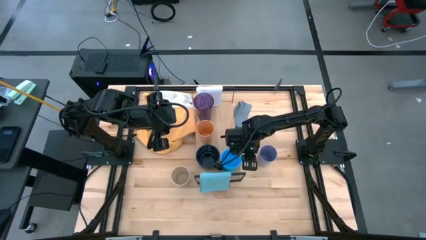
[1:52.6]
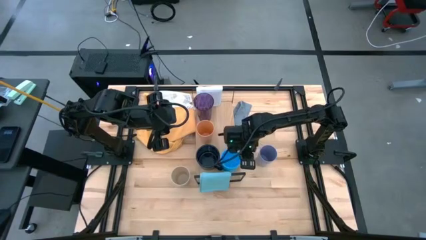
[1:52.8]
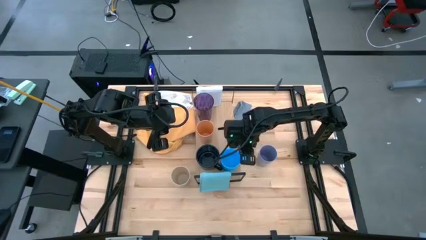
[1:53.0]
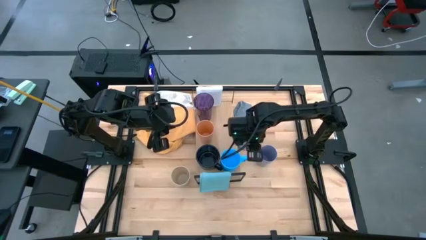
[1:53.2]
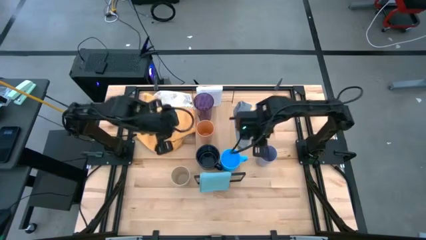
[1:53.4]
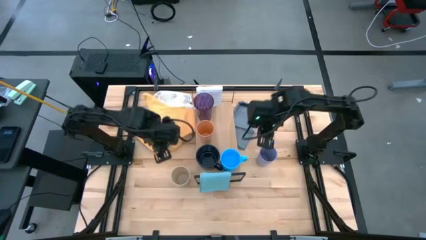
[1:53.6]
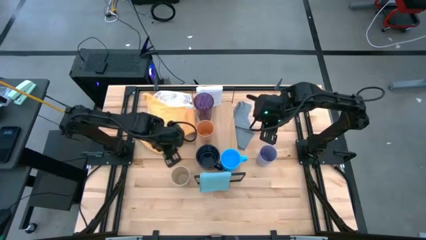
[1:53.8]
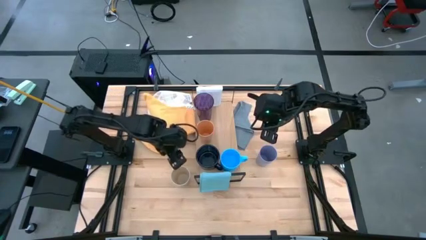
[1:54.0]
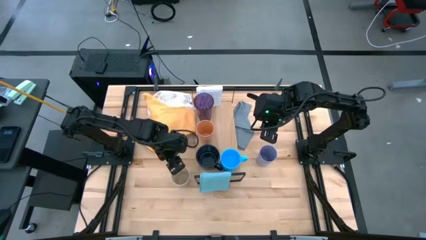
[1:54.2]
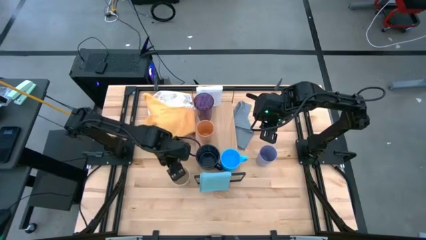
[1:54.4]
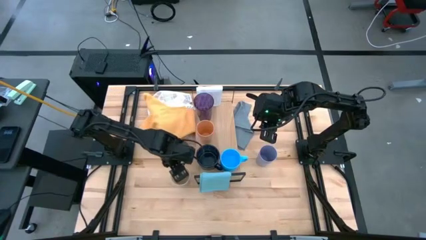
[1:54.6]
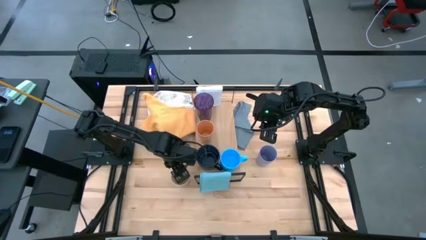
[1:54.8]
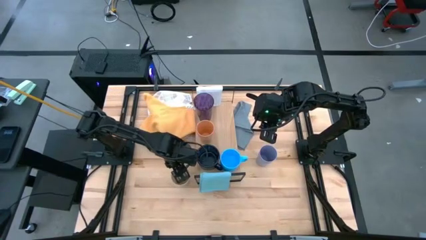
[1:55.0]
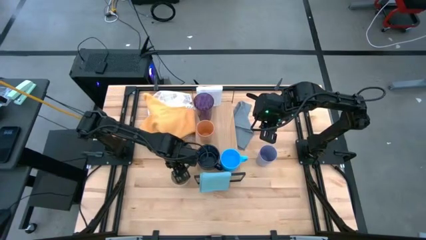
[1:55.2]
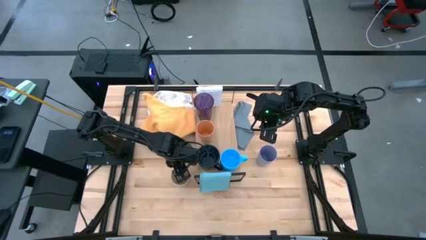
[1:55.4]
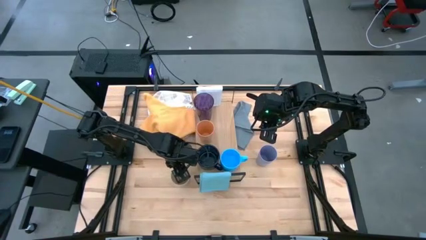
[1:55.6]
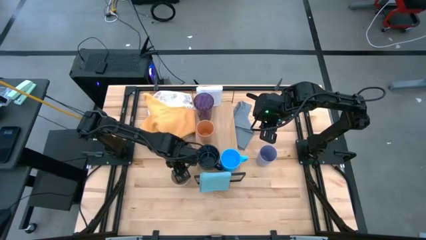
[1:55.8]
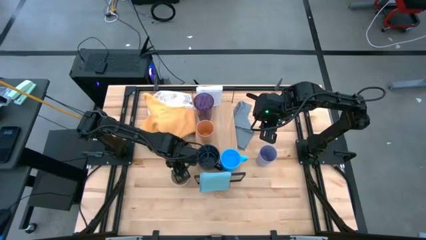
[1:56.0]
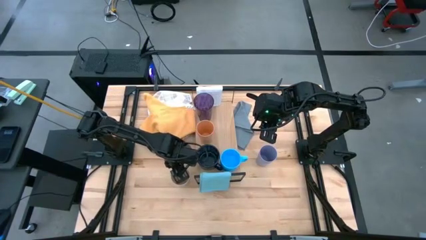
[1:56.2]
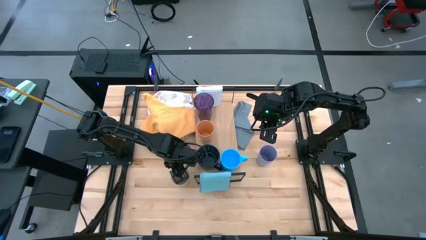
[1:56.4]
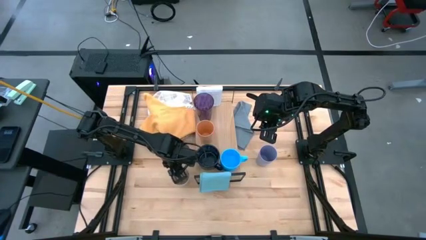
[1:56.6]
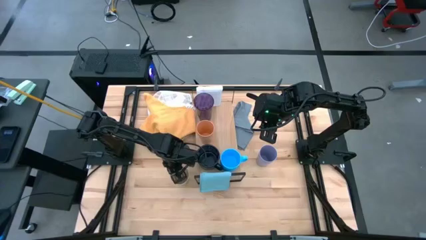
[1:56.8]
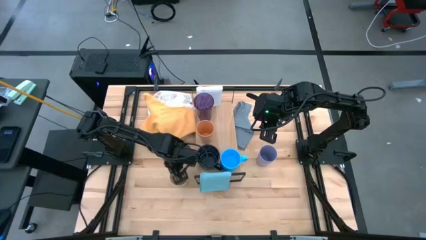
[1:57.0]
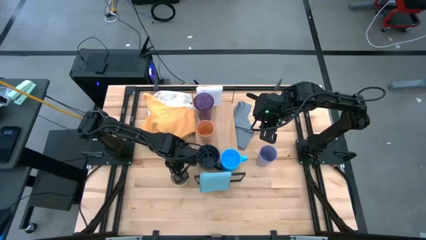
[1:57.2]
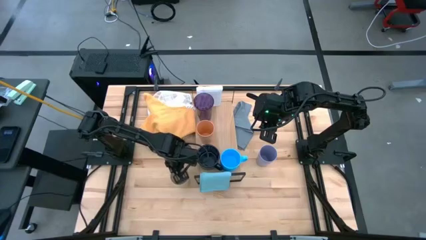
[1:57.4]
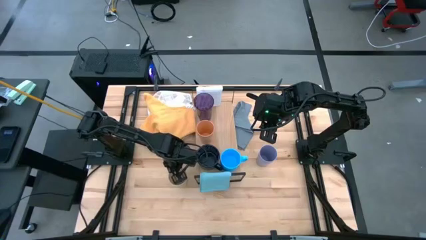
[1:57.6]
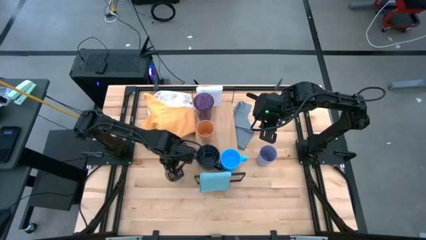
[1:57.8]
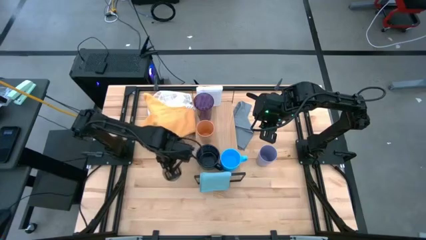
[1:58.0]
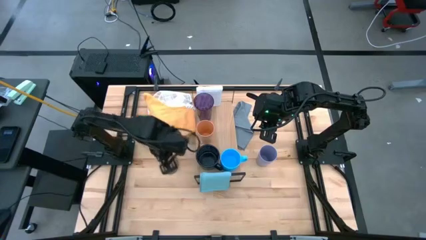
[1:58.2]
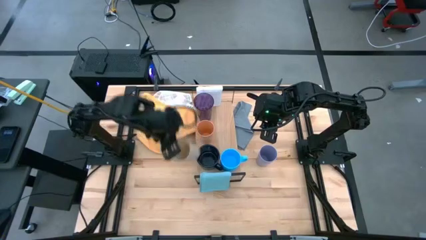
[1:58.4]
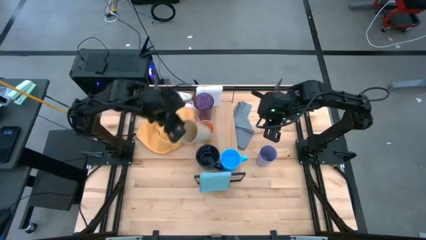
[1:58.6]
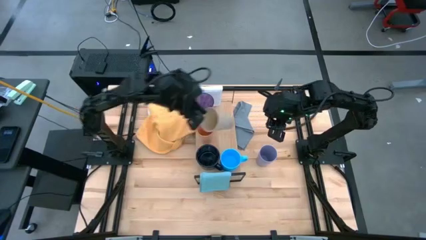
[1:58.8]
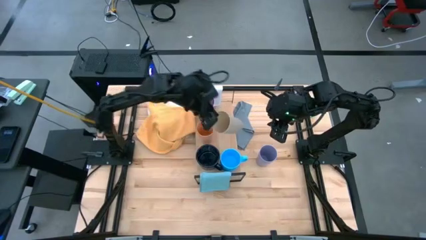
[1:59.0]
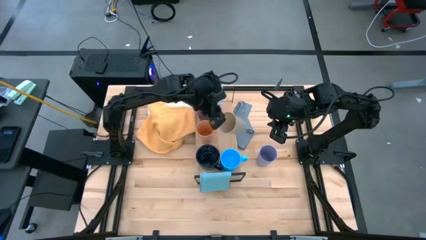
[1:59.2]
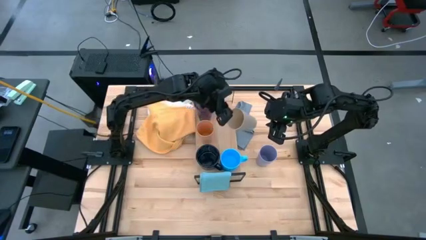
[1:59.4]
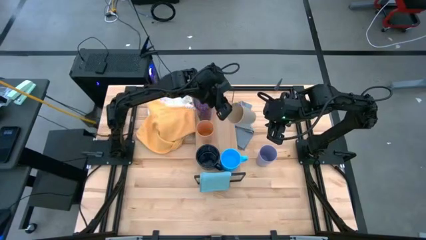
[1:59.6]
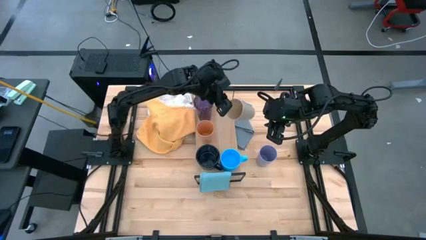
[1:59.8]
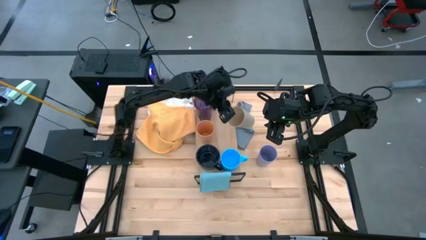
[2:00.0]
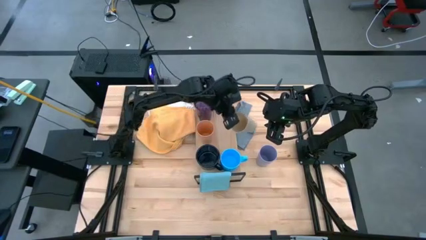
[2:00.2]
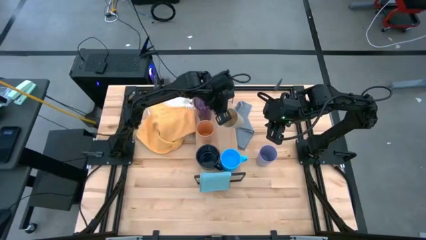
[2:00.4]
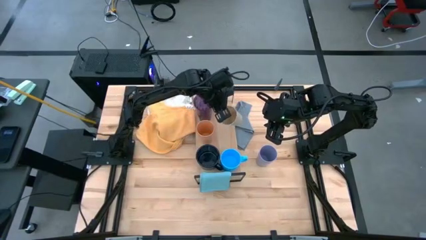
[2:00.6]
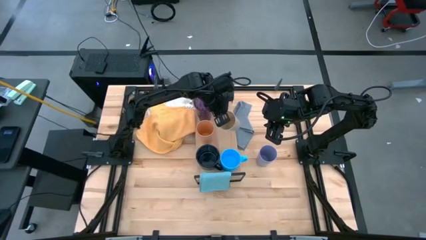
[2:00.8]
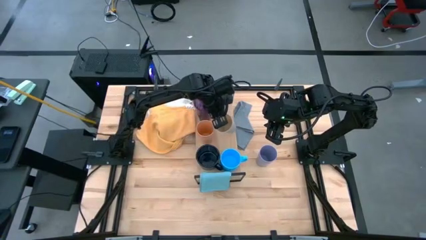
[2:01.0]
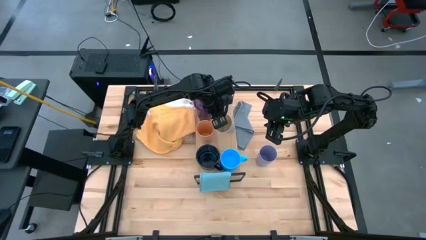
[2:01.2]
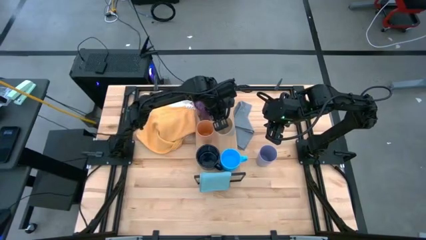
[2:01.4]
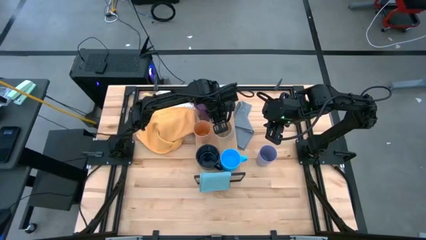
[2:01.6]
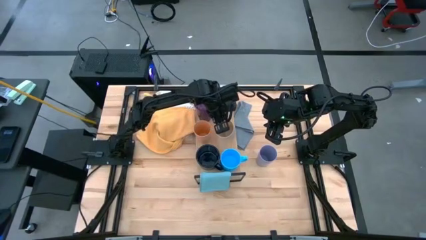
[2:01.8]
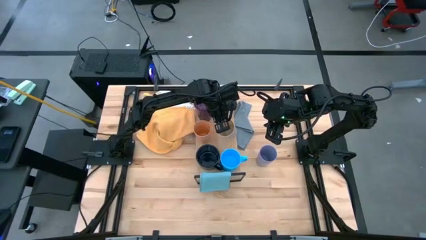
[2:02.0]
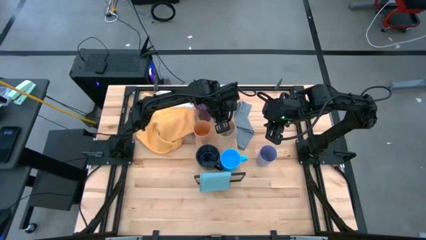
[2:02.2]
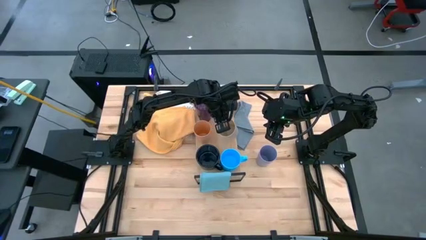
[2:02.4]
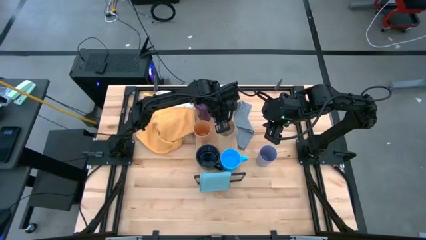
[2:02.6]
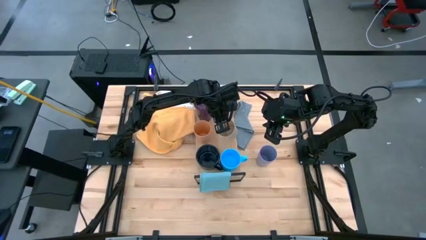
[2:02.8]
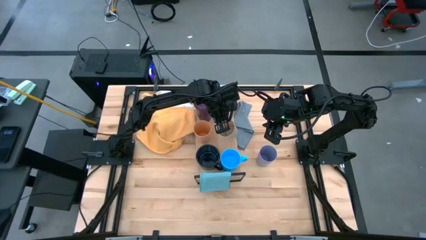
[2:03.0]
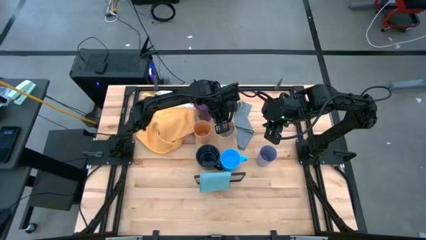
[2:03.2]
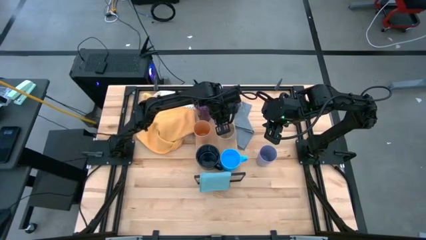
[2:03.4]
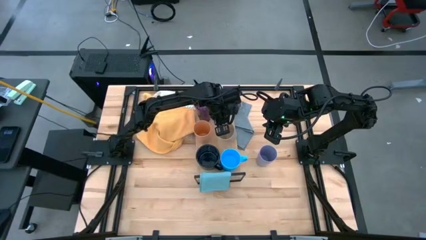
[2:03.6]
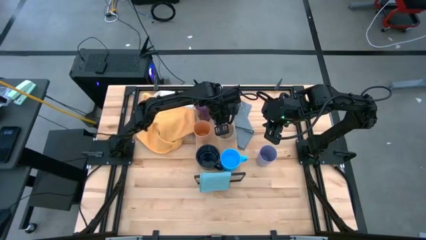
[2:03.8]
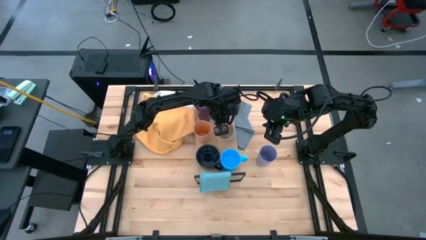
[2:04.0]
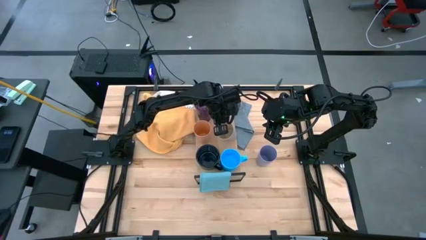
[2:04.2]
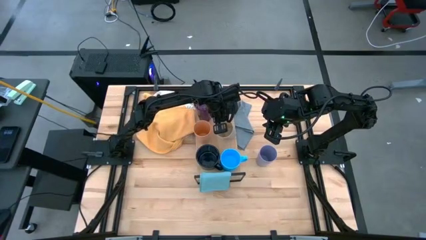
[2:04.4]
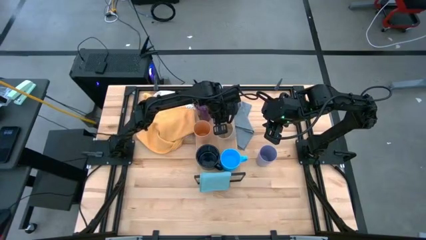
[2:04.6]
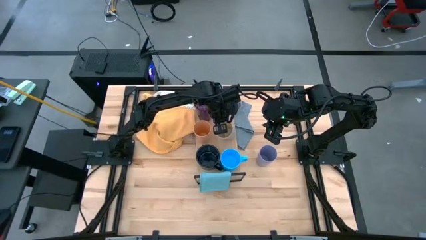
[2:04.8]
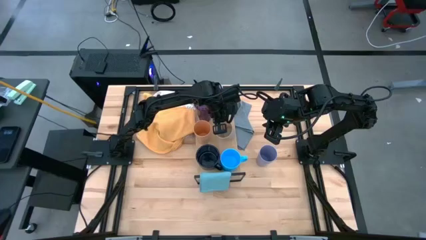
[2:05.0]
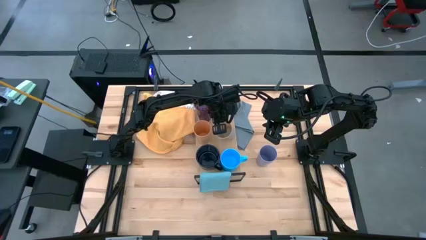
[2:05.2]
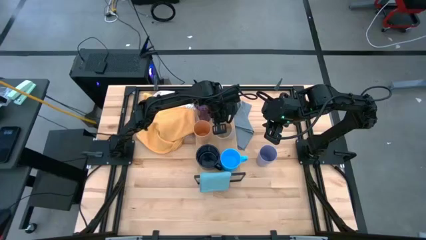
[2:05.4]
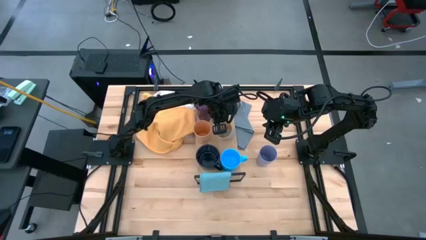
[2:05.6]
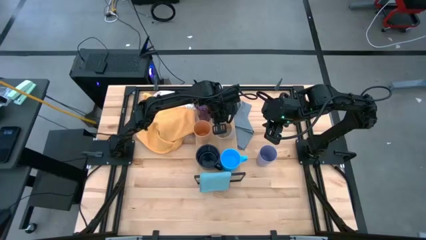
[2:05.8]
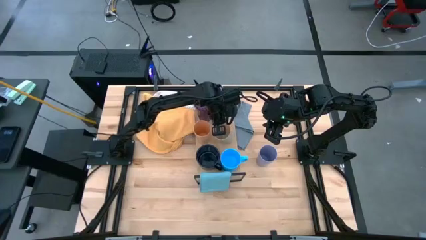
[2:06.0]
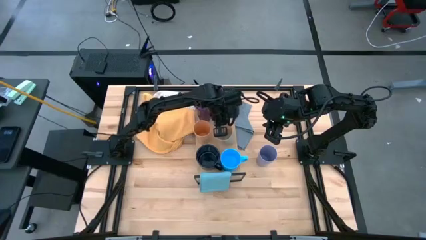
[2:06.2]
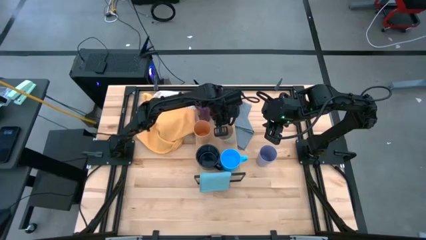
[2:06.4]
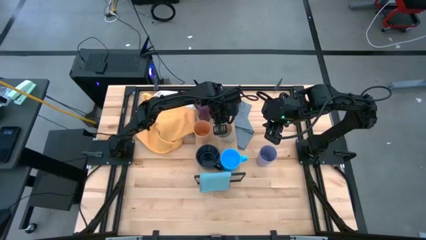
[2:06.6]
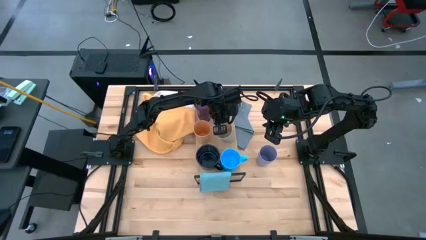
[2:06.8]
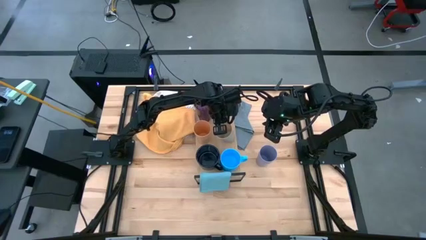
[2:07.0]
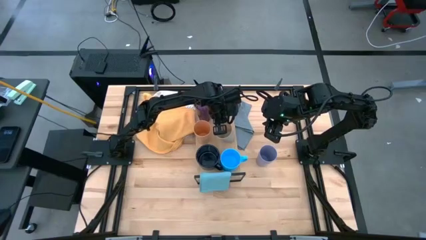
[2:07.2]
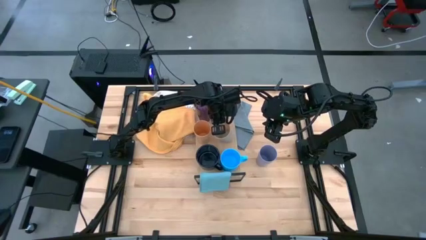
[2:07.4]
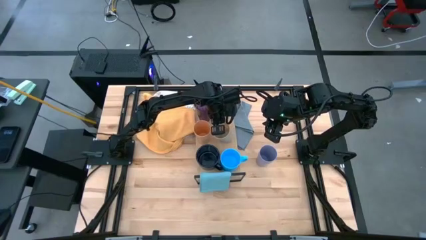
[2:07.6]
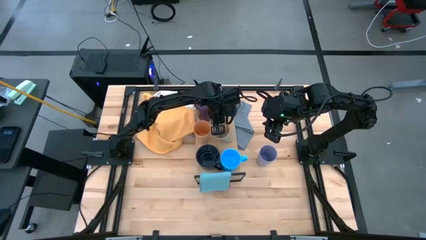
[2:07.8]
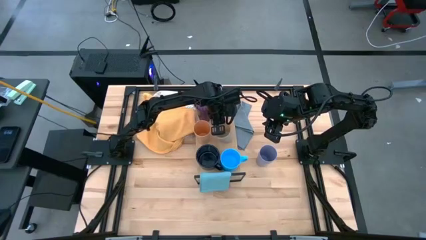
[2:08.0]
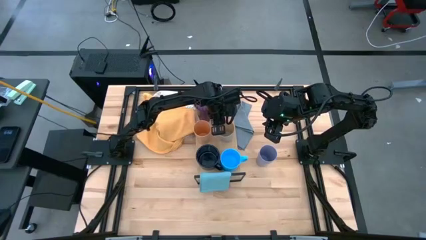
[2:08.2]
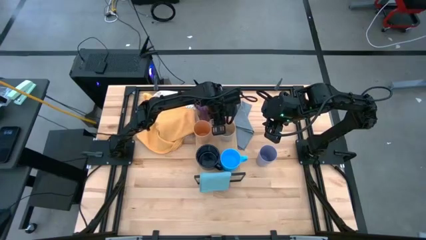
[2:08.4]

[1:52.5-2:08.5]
Task: Stack small to large cups/mugs on shelf
Put the light brown cup on the shelf
